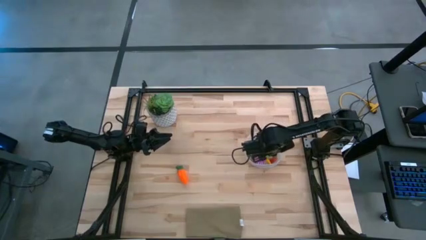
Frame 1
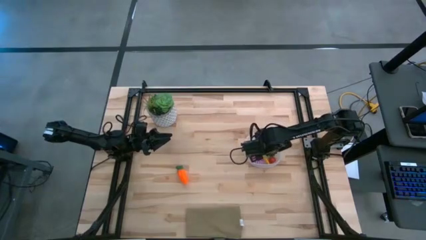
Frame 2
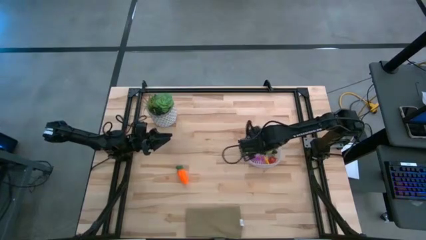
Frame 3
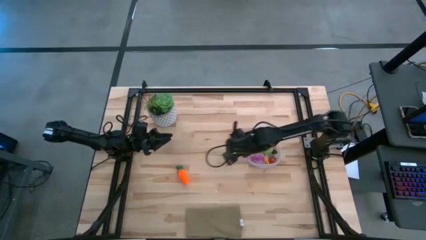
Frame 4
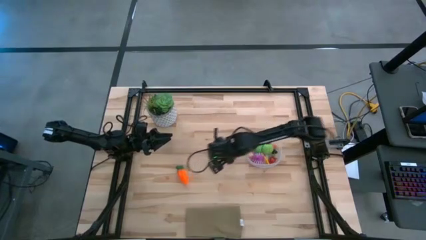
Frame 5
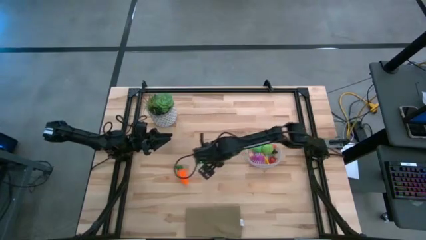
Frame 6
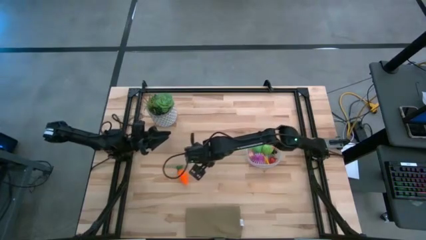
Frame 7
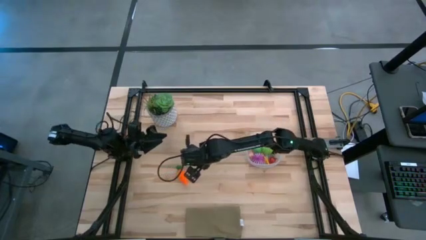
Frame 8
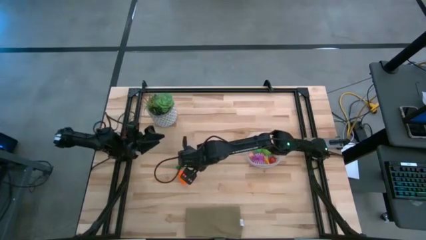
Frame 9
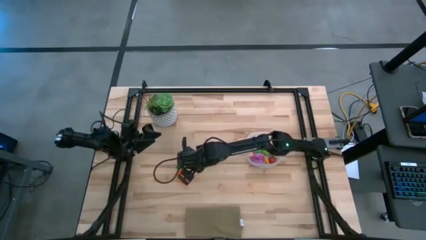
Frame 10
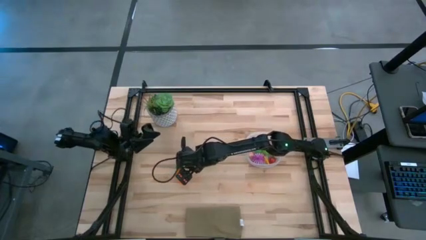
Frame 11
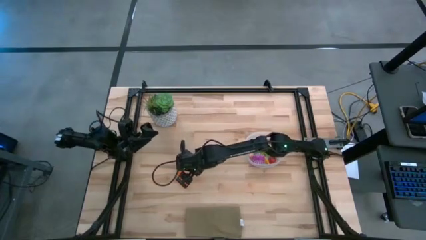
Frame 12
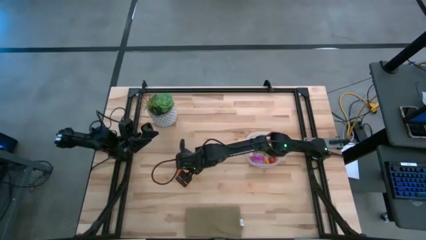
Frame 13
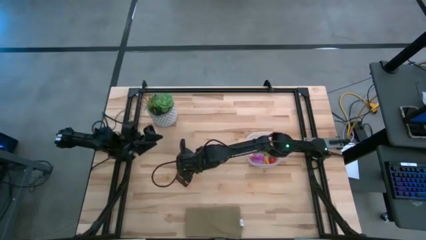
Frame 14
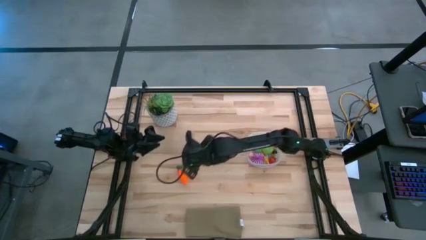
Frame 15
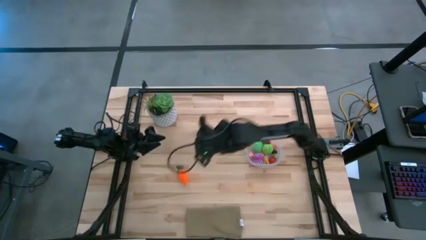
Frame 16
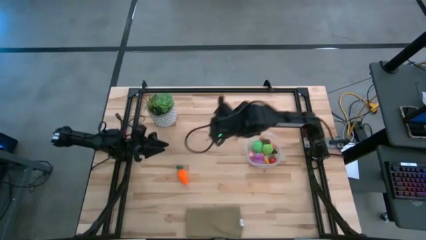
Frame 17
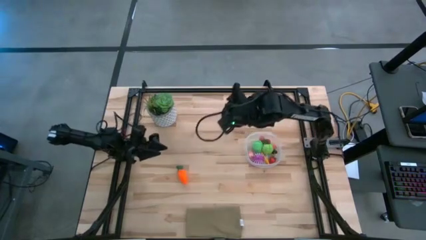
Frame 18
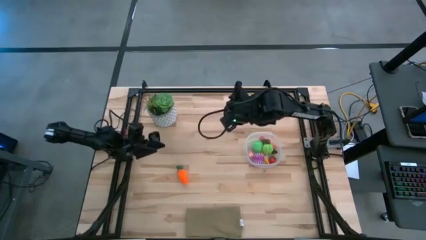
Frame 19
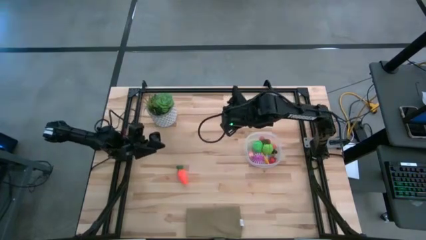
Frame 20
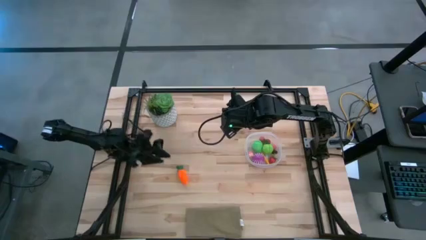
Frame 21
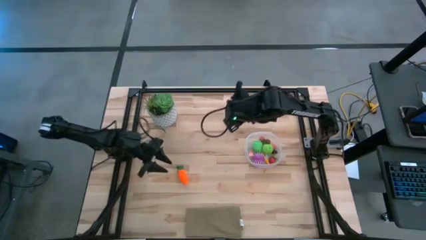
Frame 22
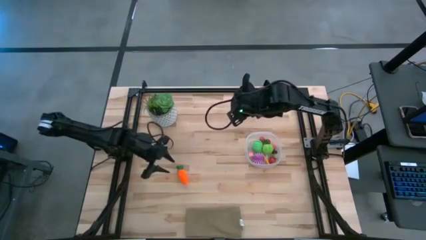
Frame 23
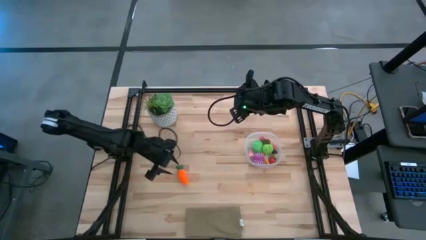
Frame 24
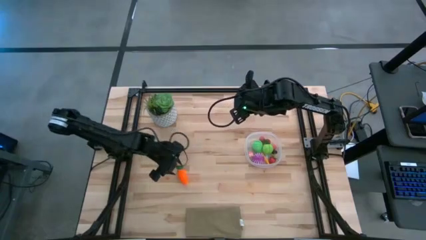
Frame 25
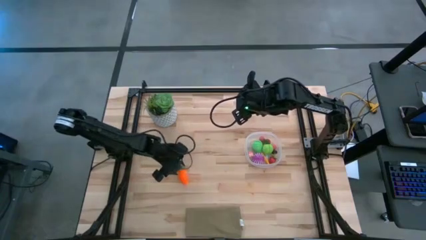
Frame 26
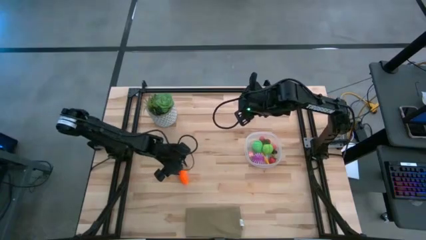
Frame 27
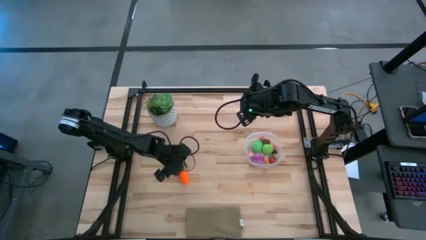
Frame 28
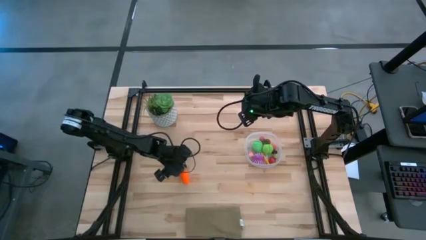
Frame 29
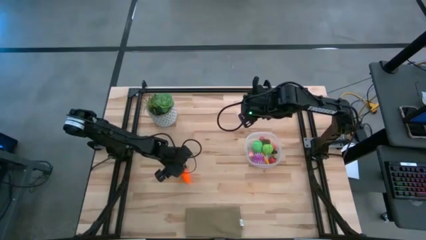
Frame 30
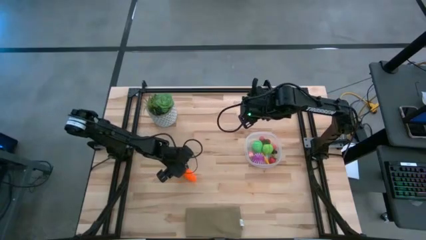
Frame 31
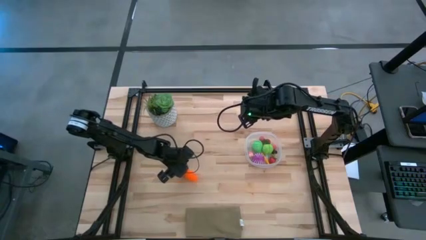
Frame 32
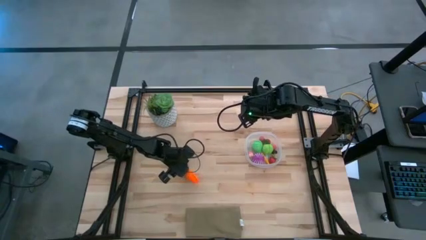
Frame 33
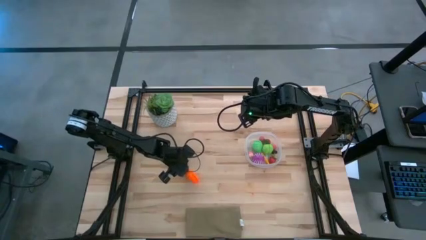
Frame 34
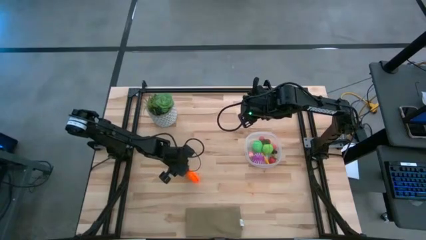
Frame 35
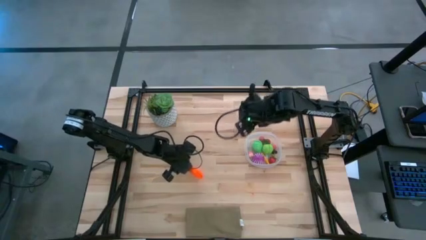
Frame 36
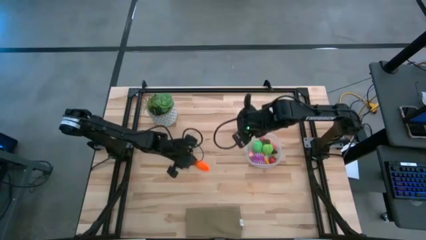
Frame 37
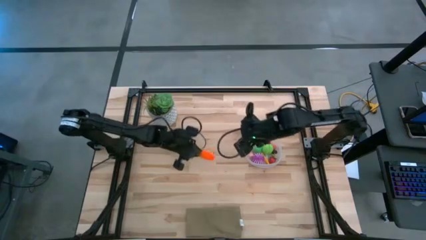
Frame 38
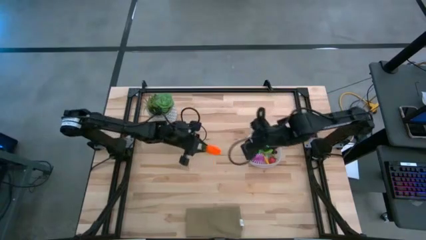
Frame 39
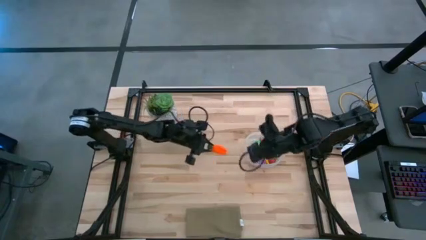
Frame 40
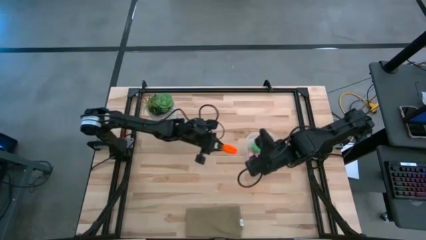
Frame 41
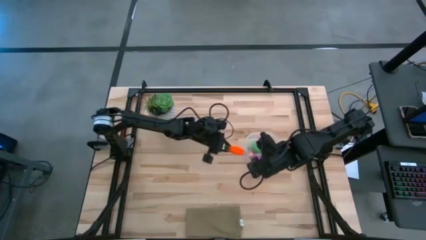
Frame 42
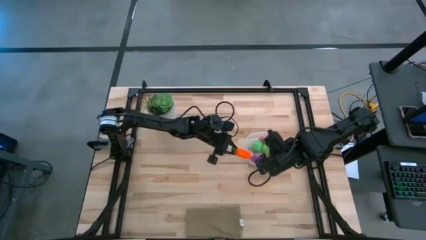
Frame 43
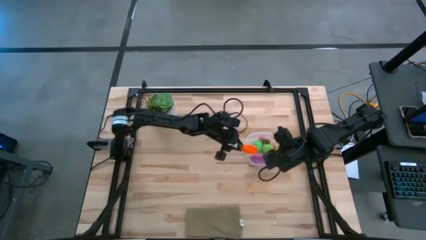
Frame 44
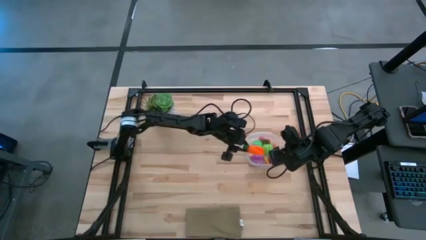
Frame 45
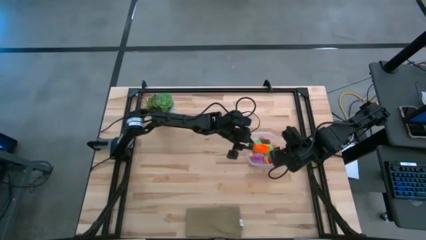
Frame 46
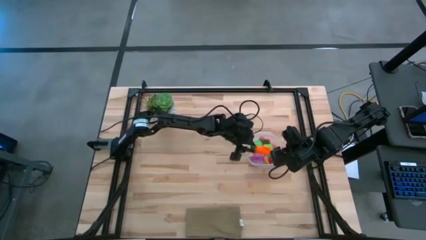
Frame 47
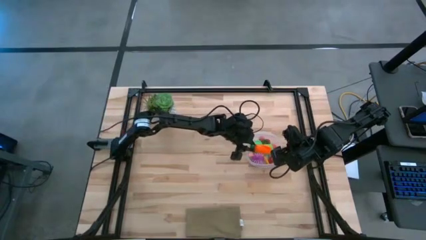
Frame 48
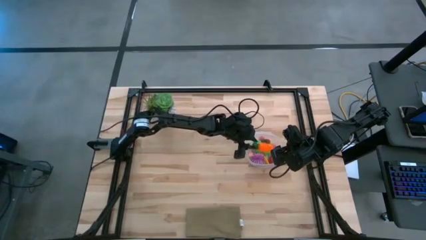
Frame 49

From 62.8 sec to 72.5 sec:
Task: Pick and placing Produce into tupperware
Put the orange carrot into the transparent container

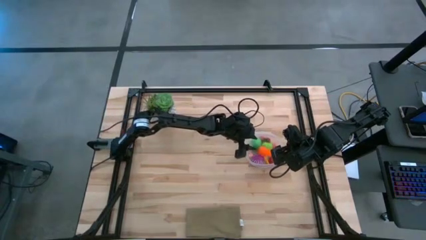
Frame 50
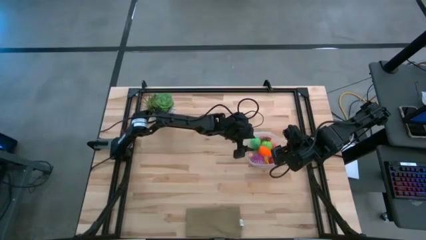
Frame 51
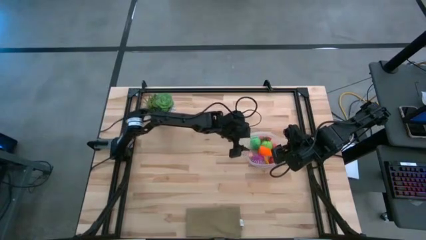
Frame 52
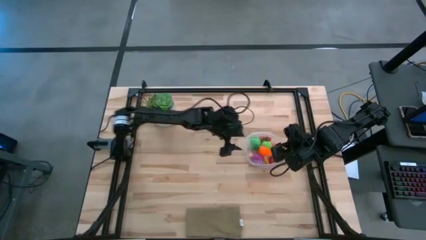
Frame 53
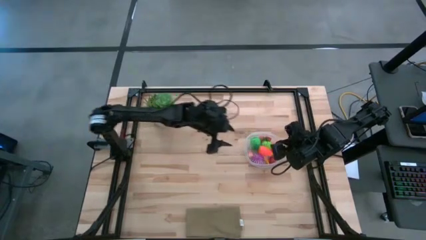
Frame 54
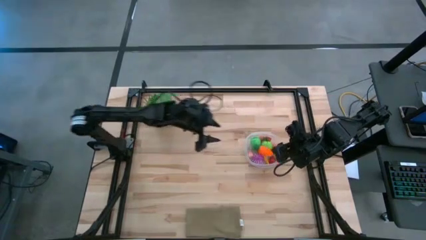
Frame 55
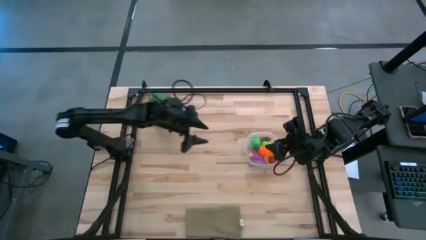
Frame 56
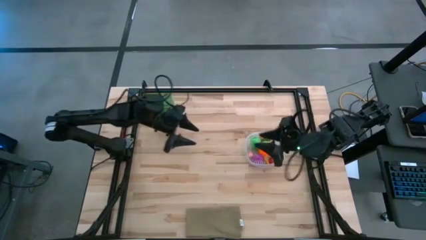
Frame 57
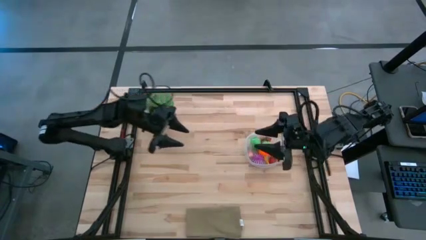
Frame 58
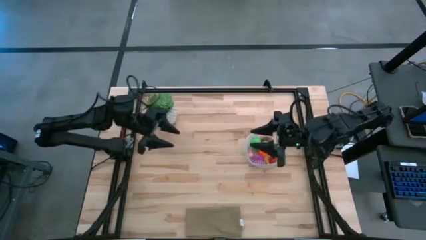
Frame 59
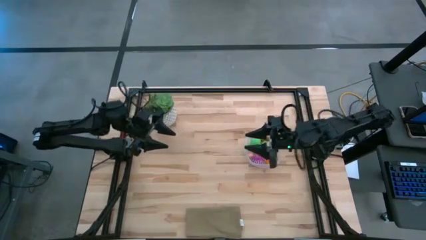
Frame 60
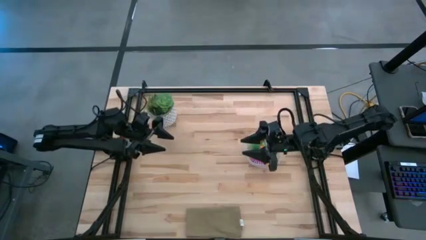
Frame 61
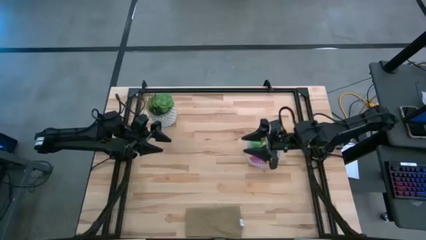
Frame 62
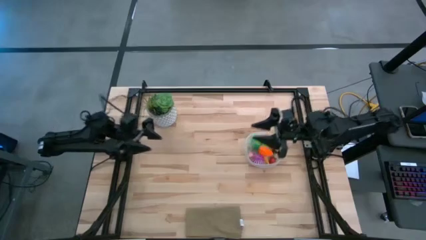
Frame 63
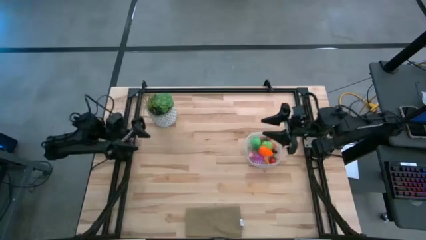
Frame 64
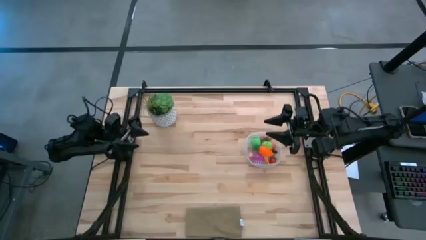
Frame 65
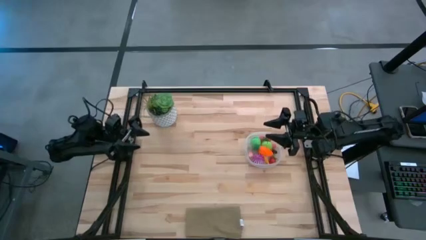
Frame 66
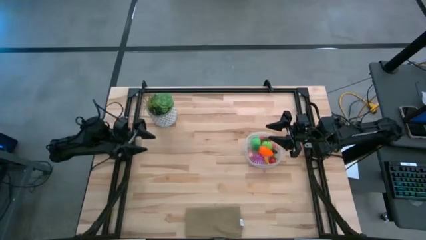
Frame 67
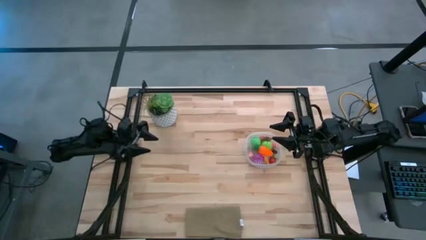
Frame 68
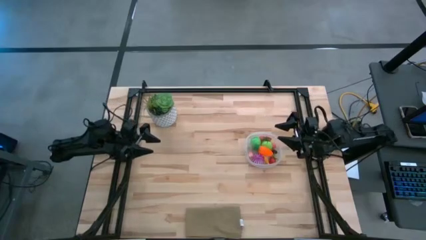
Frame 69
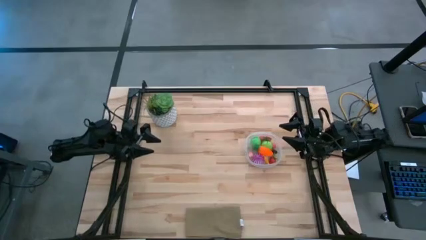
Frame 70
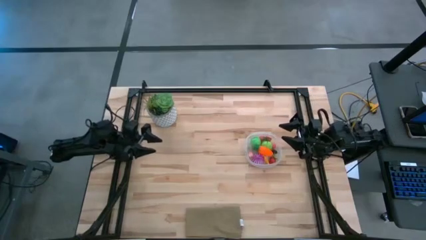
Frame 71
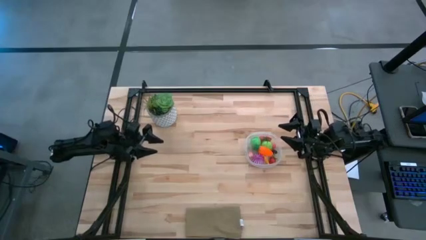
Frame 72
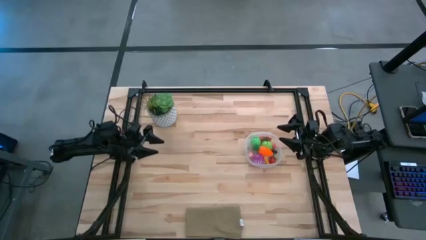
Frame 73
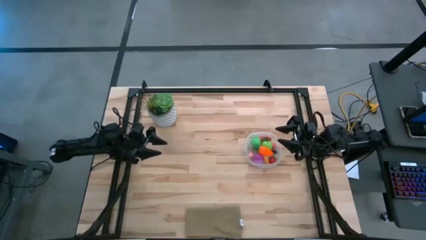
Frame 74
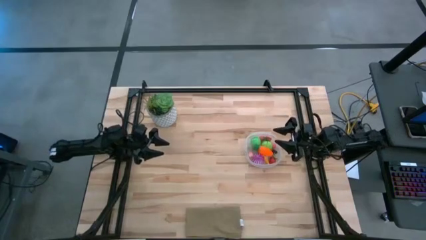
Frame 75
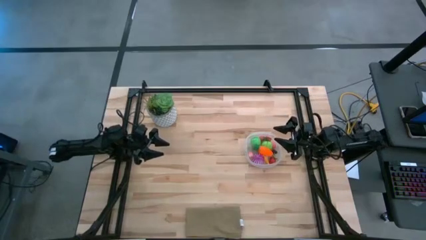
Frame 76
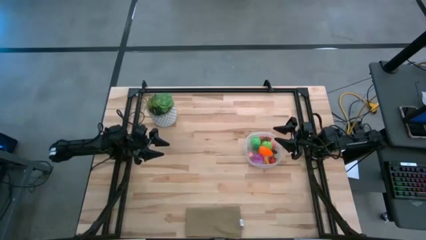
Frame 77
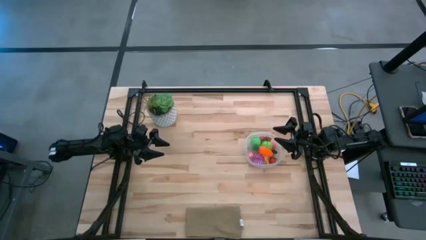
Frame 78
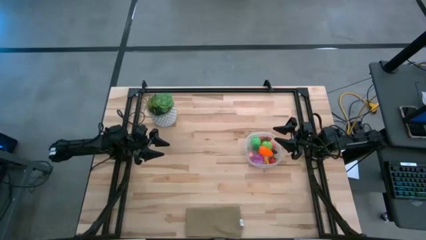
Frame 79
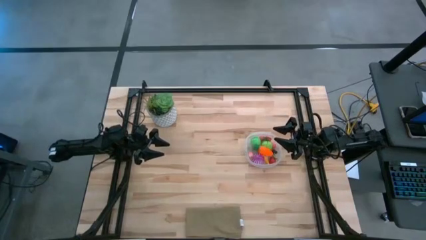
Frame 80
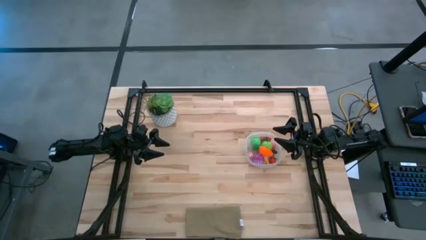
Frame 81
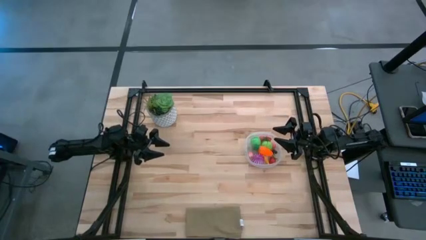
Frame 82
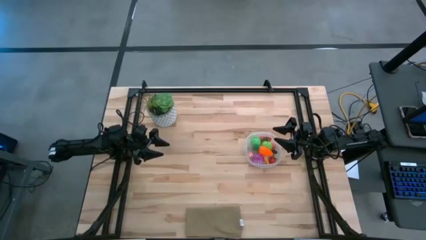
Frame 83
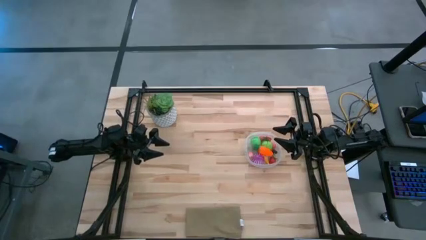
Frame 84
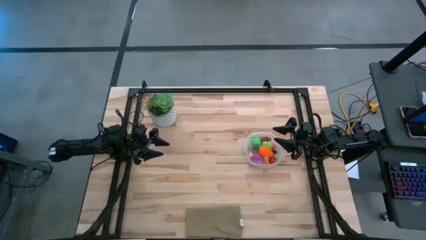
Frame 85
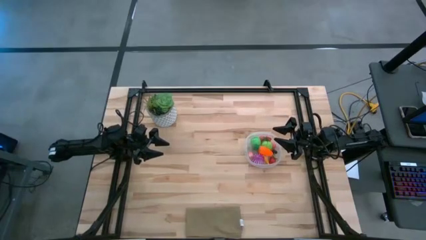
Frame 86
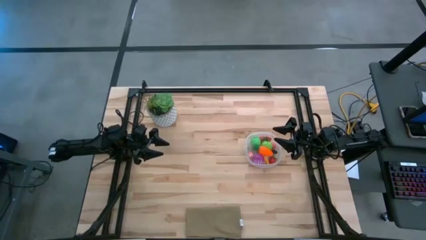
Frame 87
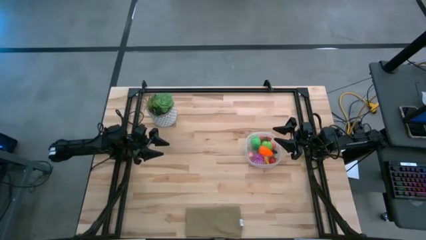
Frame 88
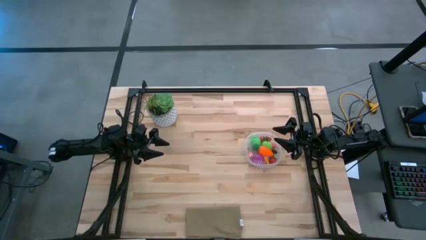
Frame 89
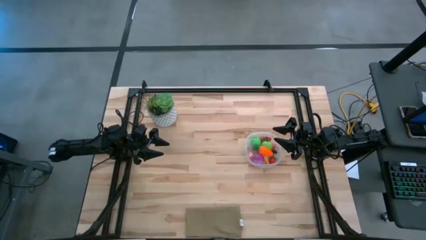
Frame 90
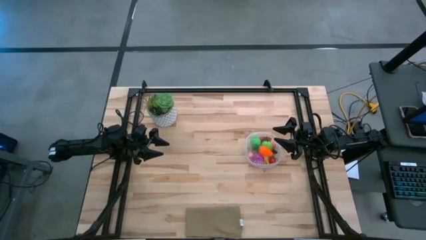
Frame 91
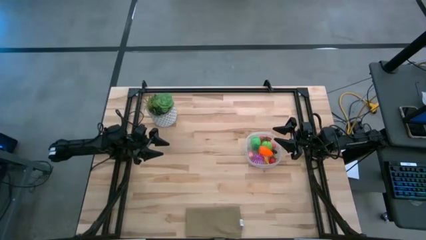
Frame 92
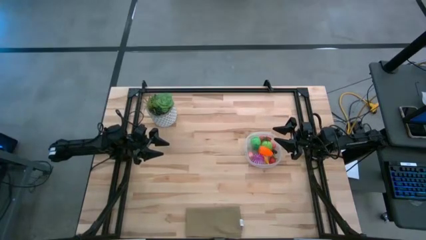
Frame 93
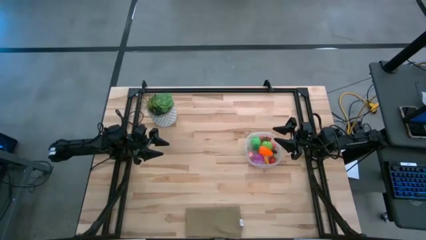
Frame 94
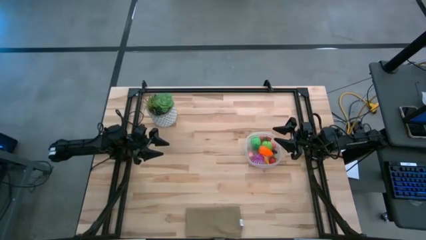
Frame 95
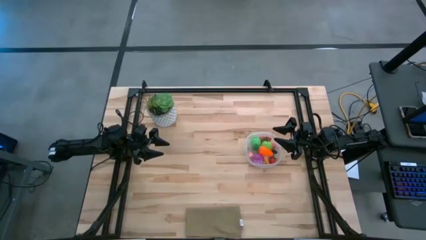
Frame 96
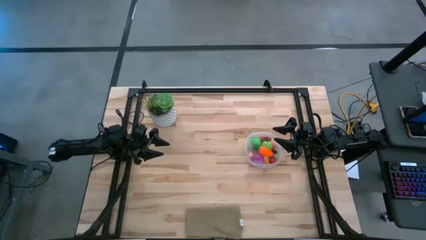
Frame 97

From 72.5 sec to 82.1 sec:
Return to Home Position
